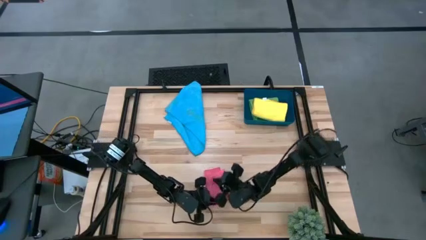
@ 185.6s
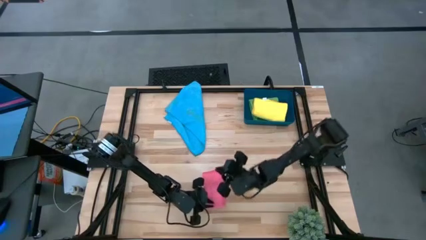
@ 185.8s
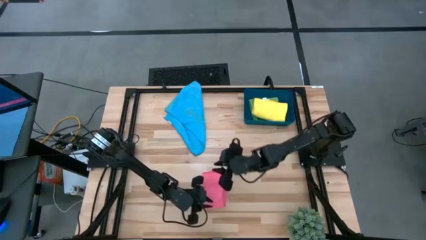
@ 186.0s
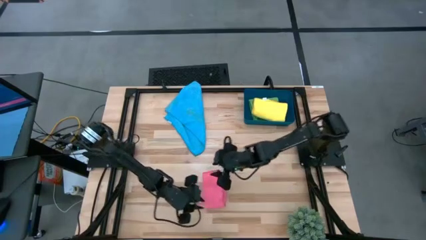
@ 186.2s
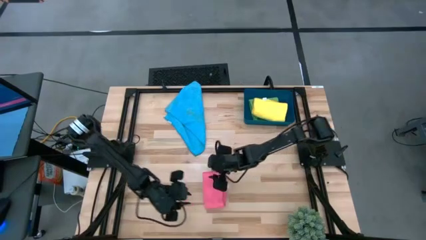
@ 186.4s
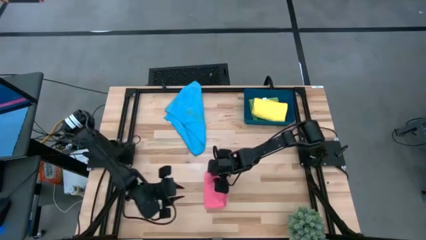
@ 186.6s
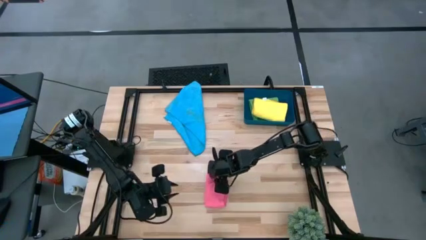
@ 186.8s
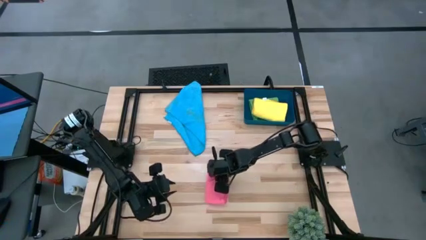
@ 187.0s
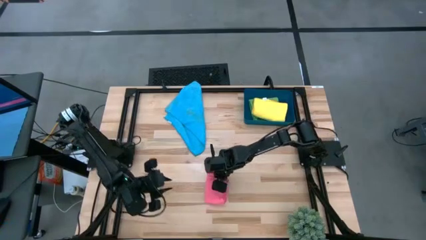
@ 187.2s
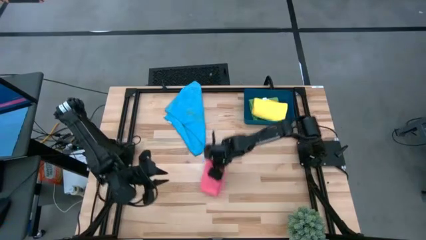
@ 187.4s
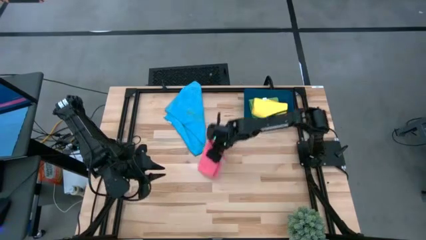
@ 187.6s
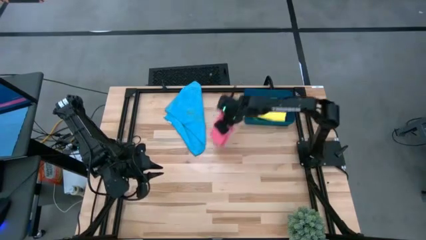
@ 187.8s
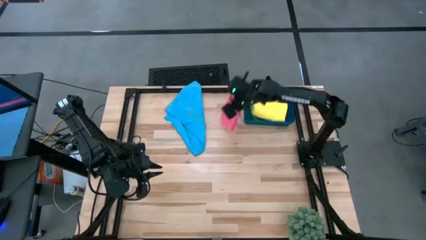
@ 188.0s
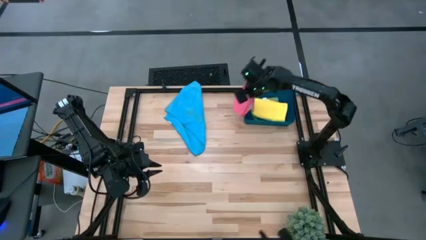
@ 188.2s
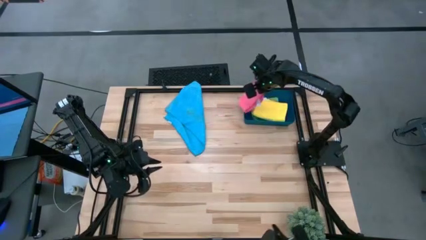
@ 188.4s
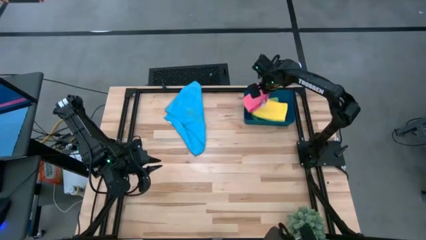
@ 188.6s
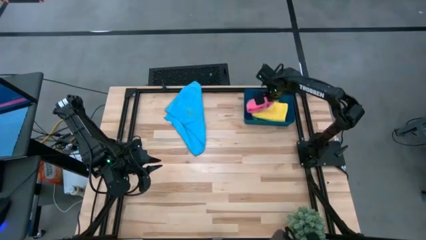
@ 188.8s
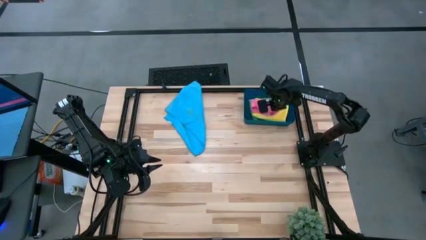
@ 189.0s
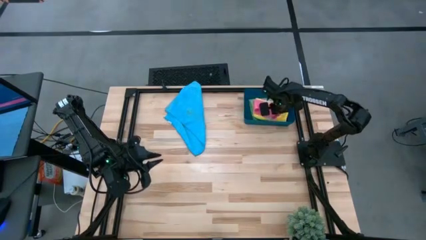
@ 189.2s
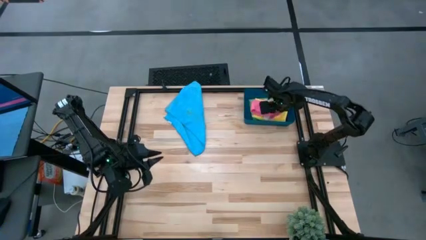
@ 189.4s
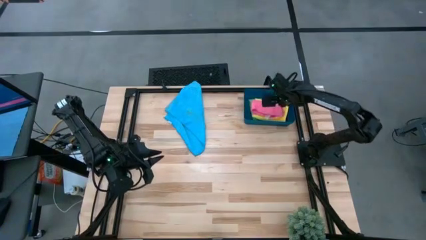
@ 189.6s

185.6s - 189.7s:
Task: Fold microfiber towels
Put the pink microfiber towel into the blue bin

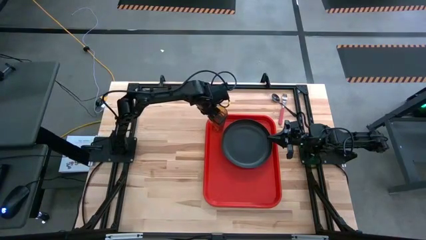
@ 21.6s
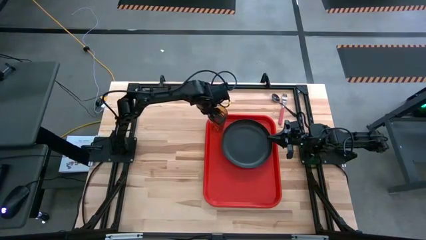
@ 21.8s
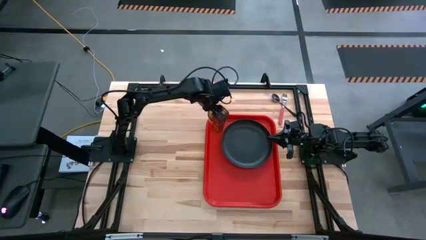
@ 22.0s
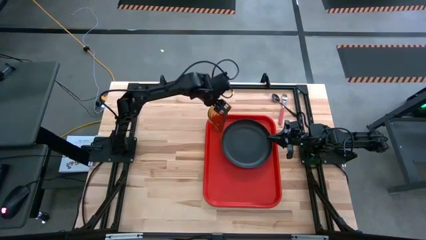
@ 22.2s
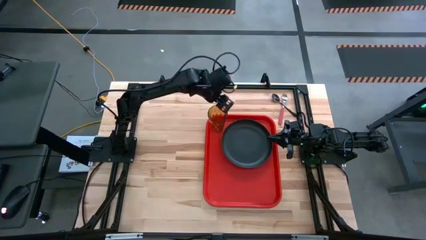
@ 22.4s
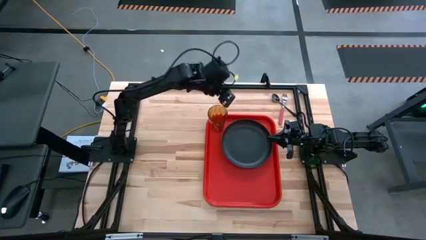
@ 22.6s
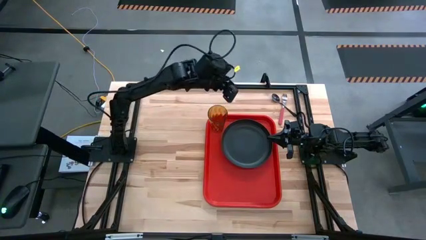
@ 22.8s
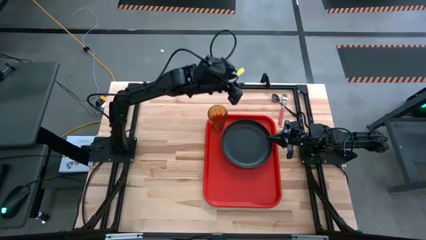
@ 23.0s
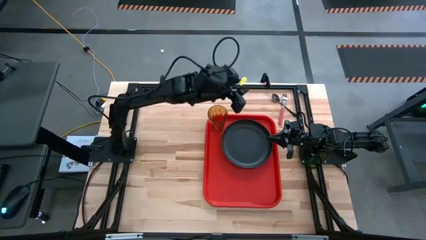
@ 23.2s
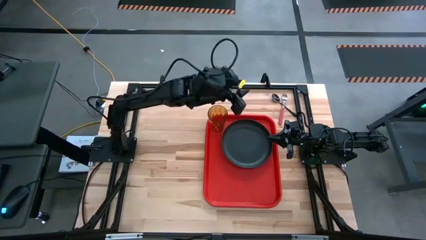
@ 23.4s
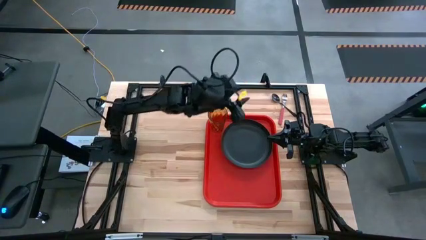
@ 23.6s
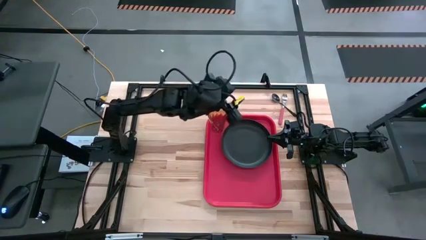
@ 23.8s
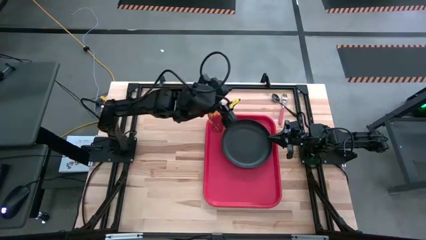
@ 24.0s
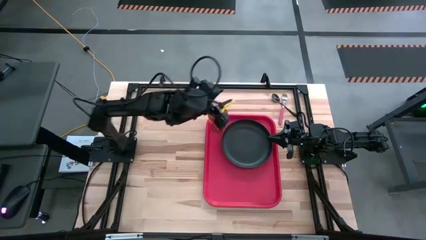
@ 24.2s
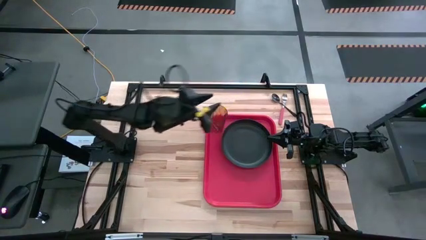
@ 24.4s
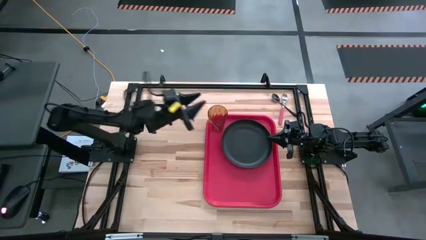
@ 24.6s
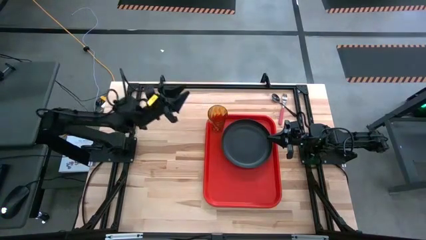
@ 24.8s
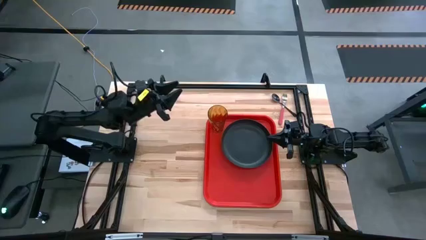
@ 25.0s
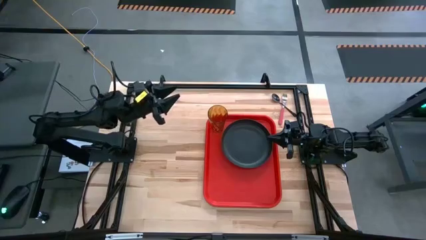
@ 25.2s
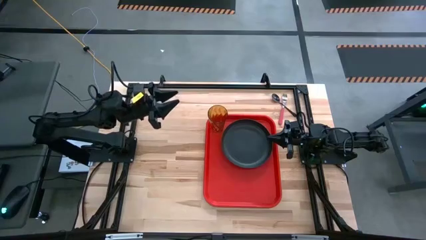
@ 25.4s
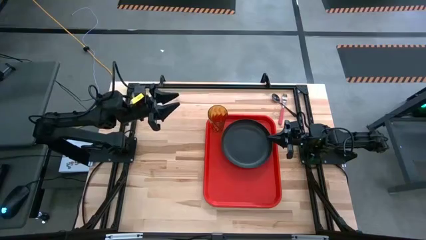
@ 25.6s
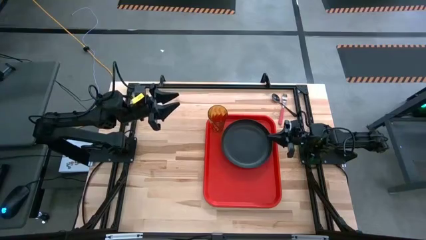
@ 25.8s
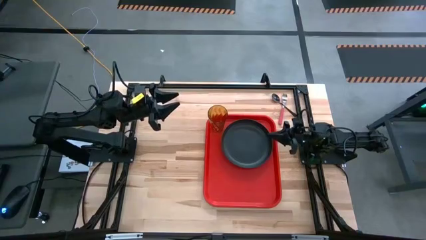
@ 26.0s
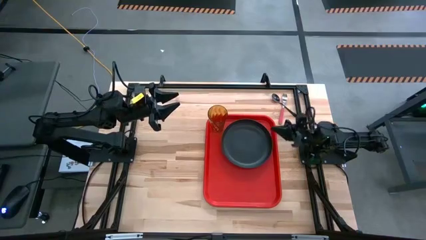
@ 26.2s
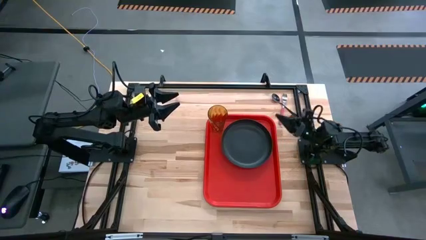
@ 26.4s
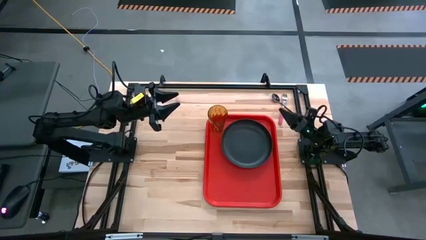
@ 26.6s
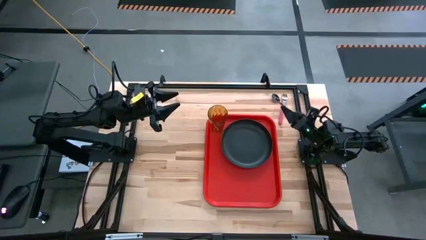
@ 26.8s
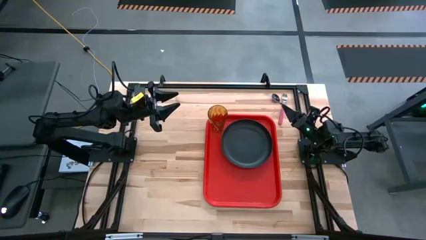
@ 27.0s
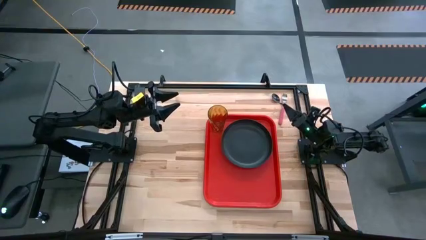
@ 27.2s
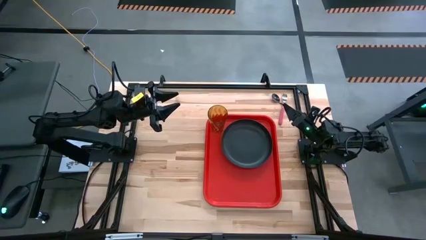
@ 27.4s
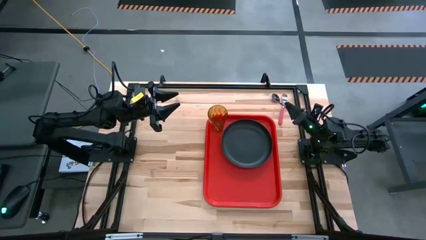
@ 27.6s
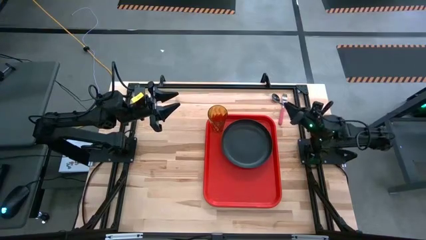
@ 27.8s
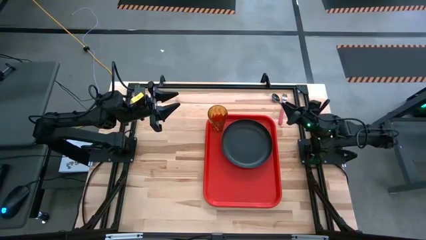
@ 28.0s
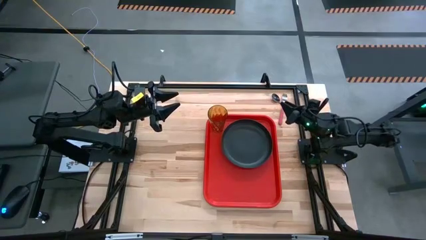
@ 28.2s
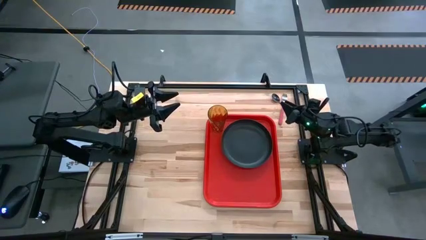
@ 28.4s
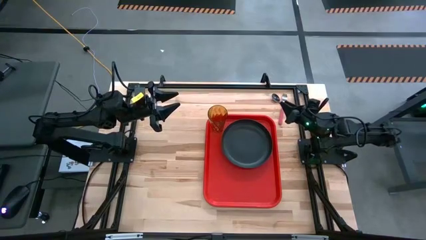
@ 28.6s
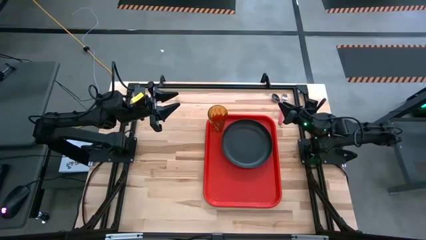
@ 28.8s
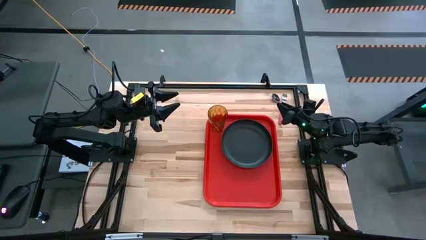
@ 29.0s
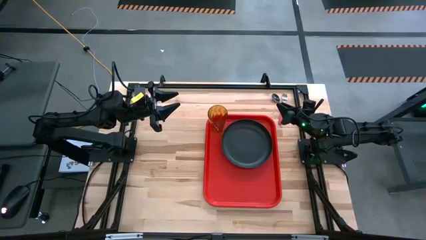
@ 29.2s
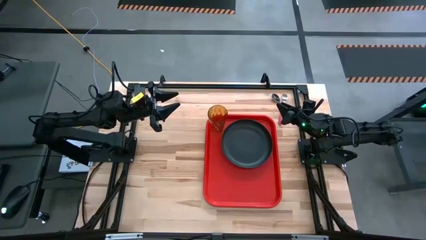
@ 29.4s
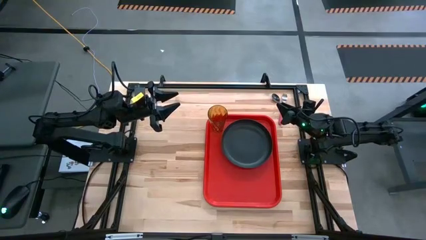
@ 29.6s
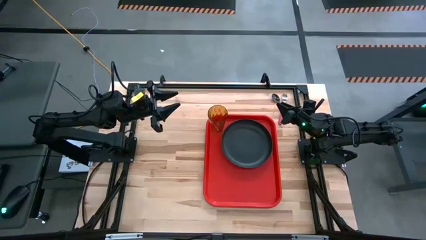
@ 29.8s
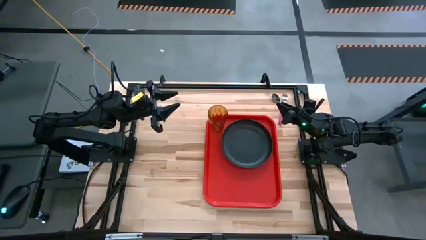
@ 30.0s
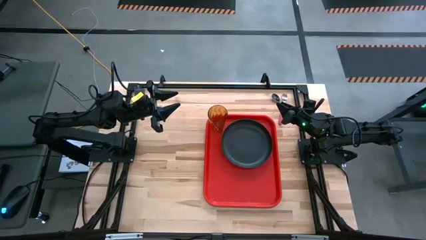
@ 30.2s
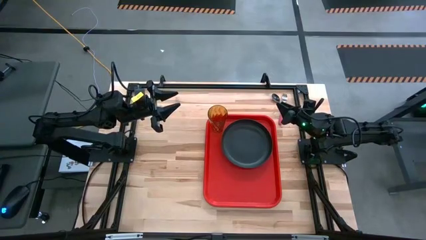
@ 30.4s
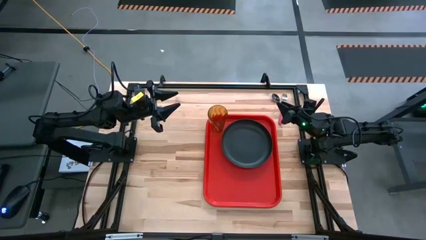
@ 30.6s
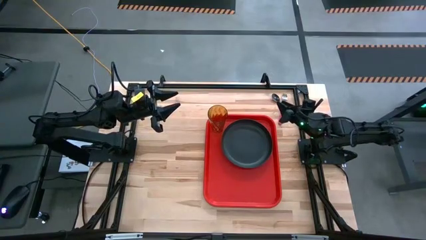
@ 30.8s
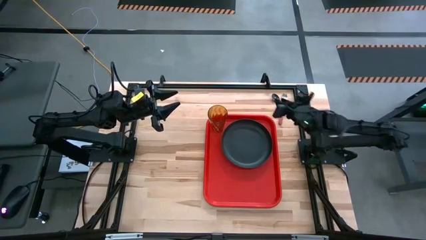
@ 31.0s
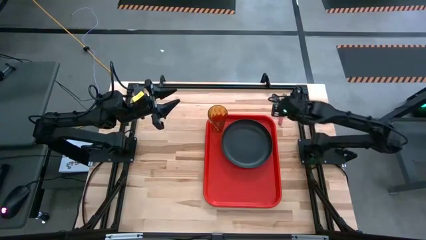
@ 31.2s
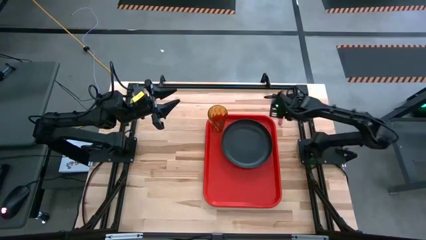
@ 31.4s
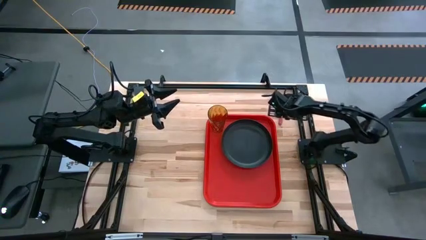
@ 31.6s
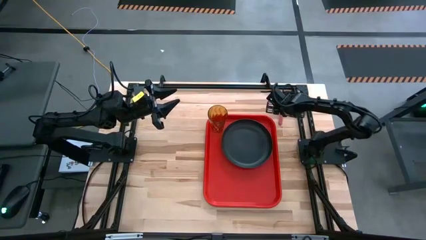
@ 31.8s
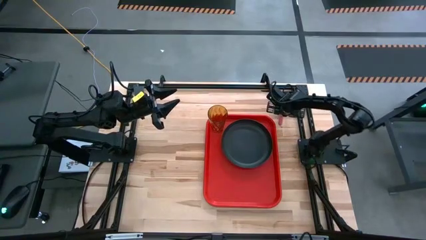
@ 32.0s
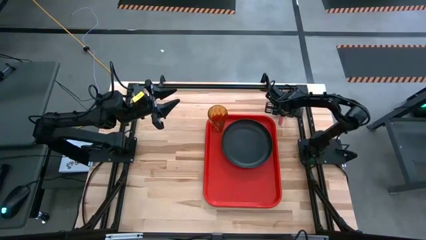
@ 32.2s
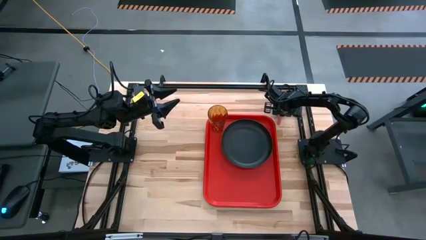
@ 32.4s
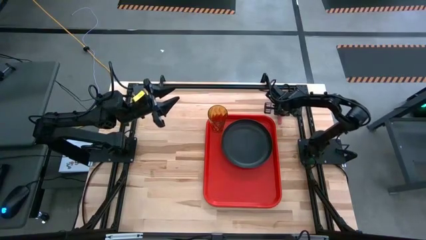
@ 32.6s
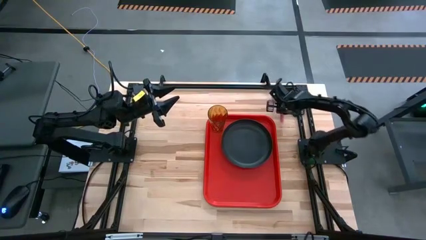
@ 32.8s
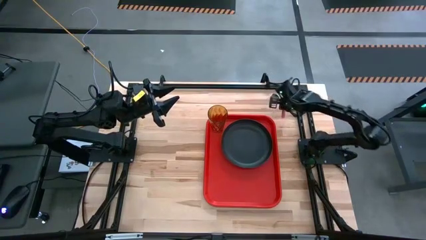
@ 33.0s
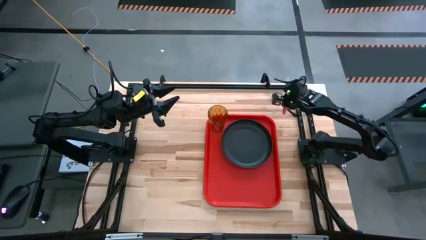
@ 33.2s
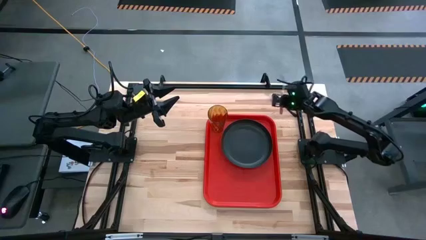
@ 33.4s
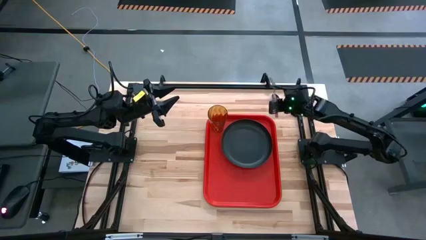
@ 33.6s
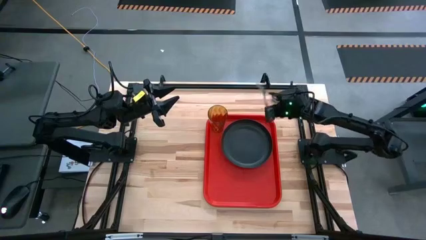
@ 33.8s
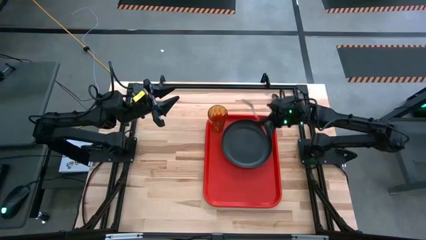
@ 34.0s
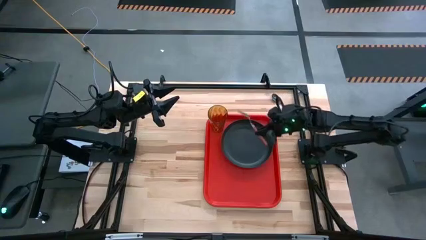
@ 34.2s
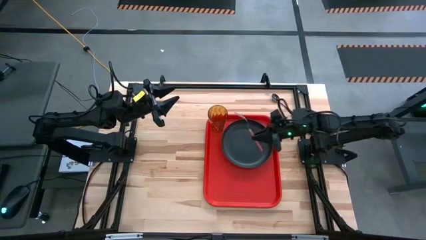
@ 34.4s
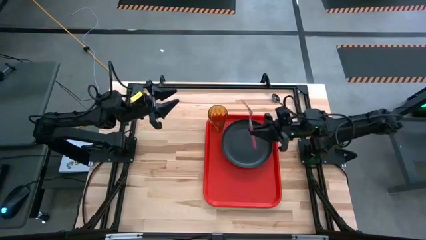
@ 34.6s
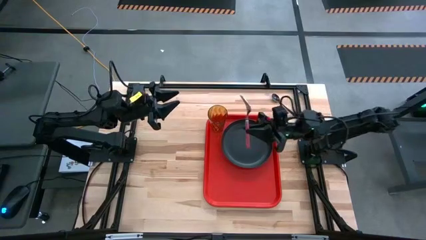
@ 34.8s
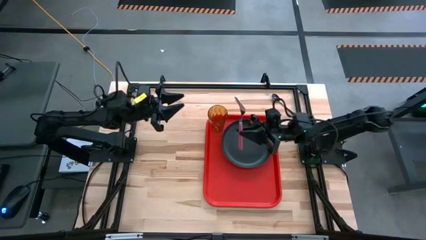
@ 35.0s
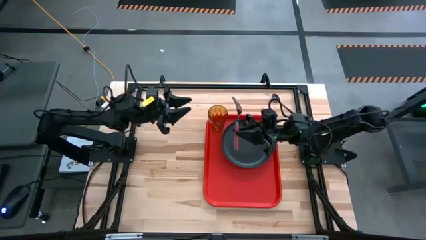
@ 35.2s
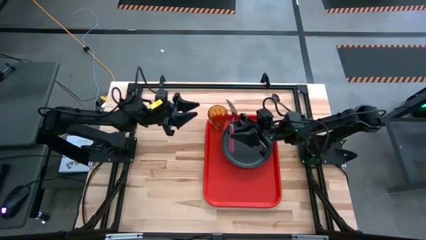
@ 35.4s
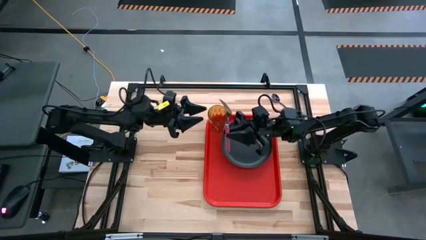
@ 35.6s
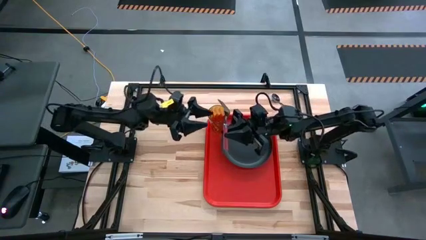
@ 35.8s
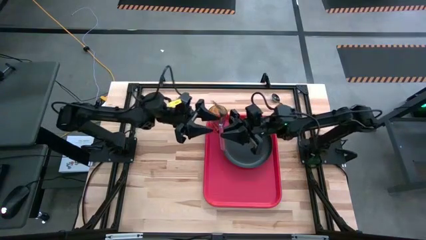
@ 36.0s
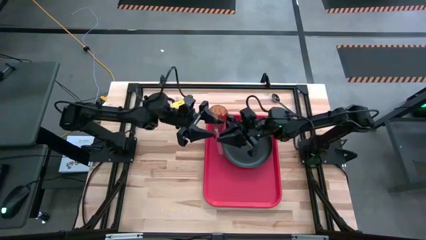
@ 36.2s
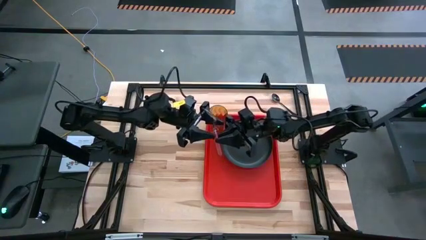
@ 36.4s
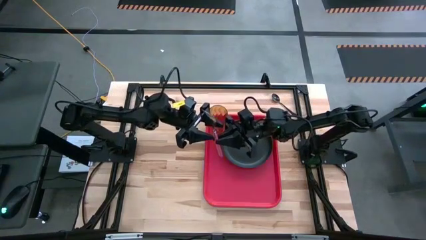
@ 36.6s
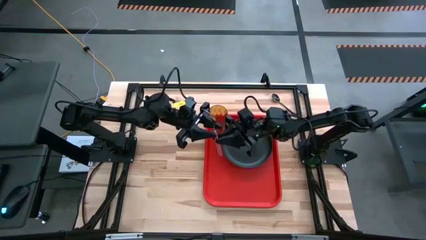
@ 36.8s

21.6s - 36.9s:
Task: Pick and place plate/cup/fork/spoon on tray
Put the pink fork on the red tray to the bottom of the black plate
